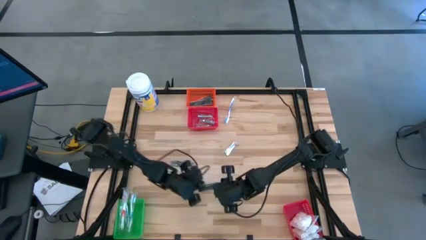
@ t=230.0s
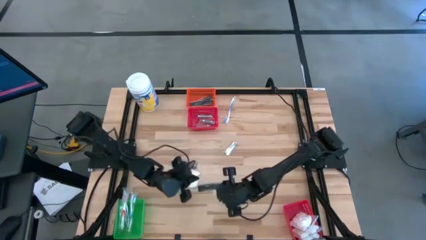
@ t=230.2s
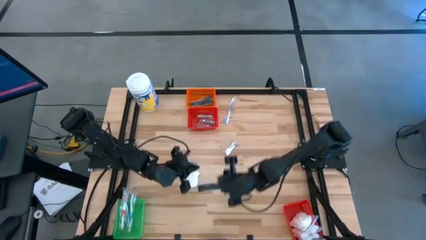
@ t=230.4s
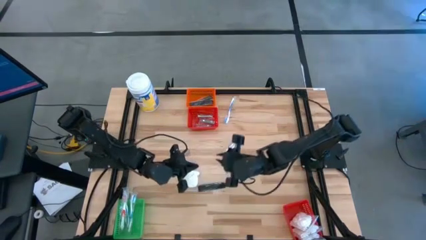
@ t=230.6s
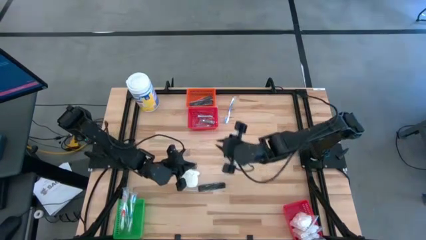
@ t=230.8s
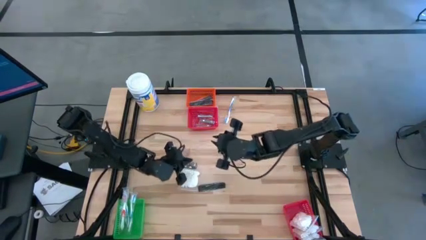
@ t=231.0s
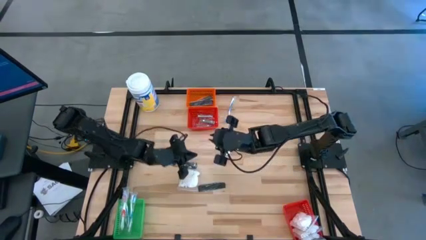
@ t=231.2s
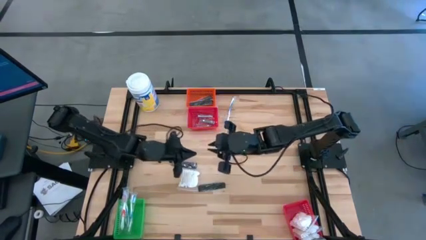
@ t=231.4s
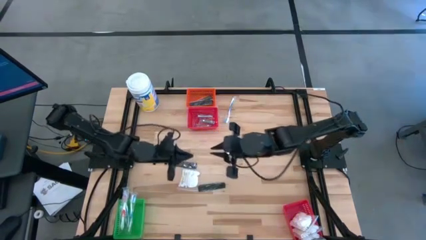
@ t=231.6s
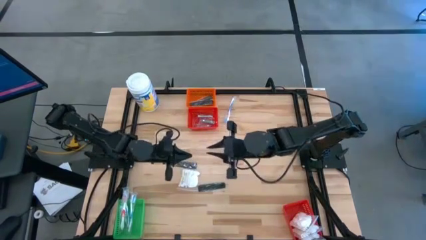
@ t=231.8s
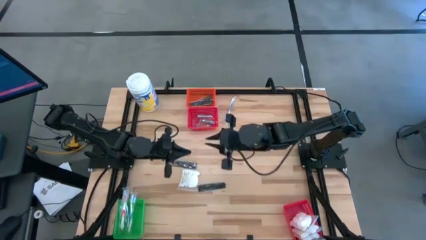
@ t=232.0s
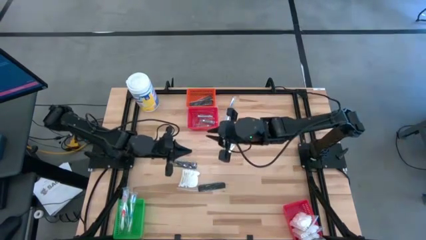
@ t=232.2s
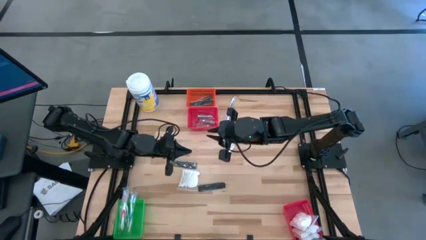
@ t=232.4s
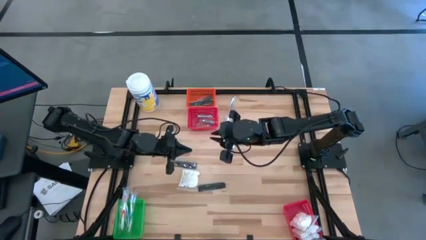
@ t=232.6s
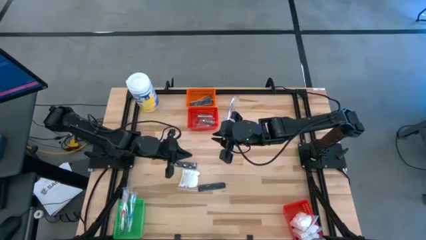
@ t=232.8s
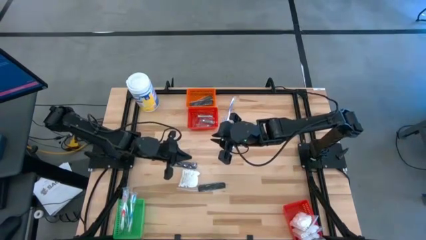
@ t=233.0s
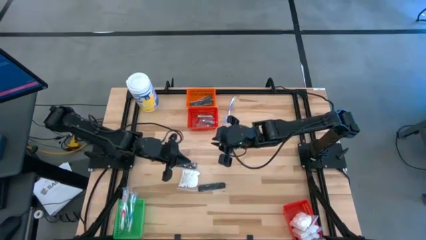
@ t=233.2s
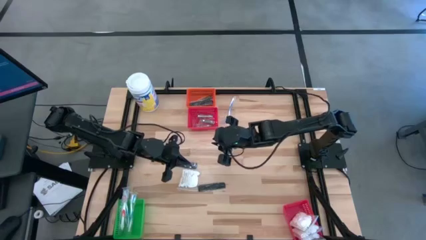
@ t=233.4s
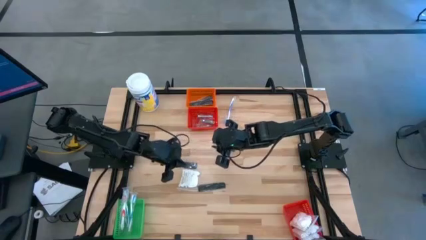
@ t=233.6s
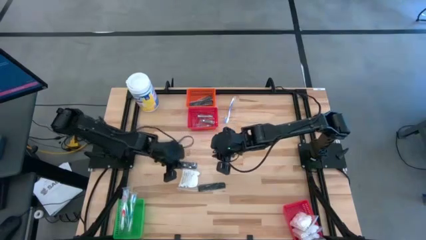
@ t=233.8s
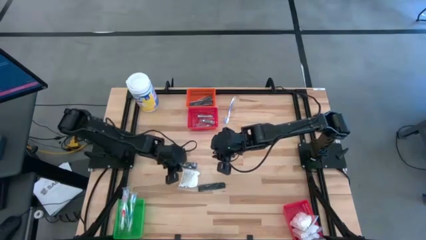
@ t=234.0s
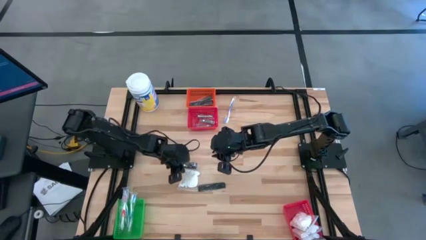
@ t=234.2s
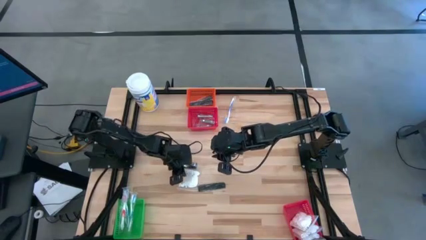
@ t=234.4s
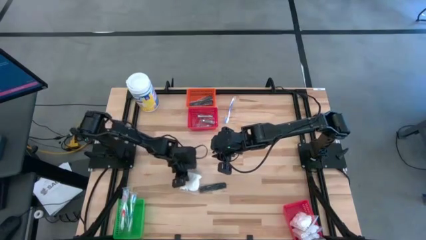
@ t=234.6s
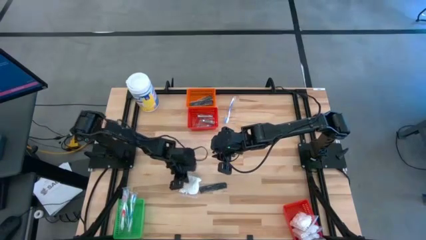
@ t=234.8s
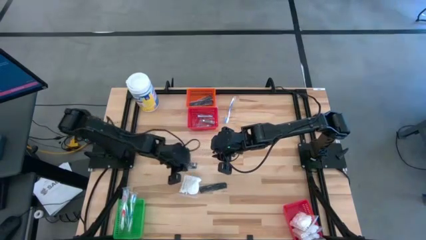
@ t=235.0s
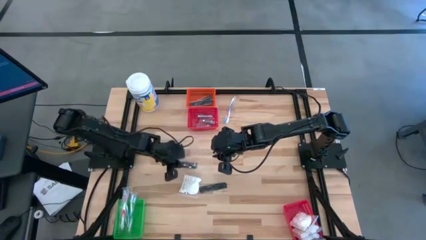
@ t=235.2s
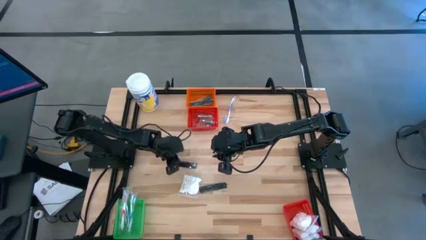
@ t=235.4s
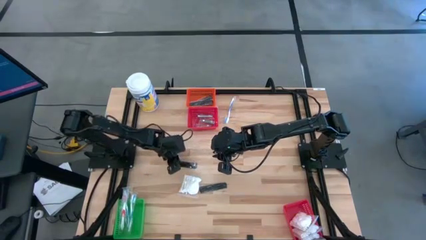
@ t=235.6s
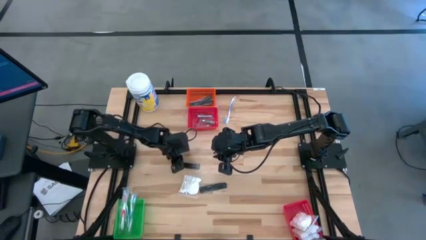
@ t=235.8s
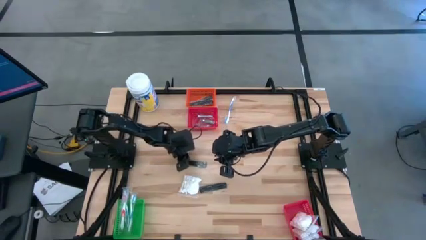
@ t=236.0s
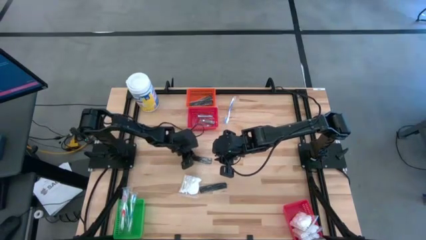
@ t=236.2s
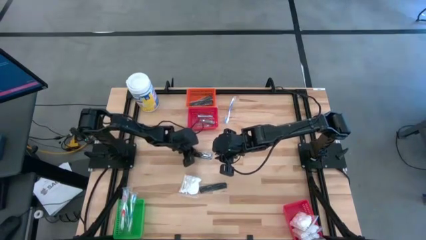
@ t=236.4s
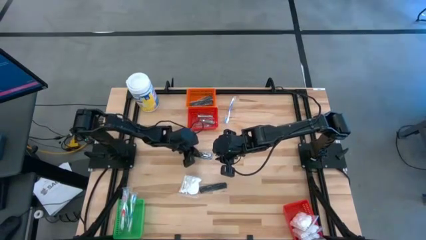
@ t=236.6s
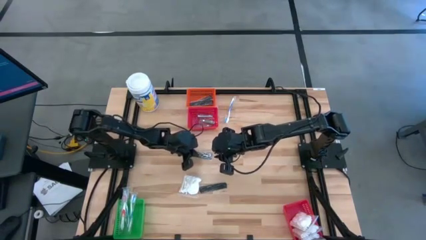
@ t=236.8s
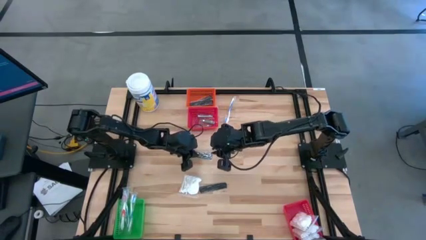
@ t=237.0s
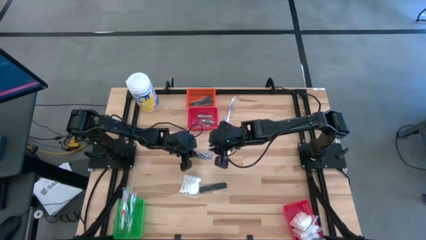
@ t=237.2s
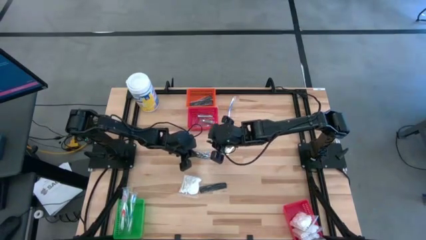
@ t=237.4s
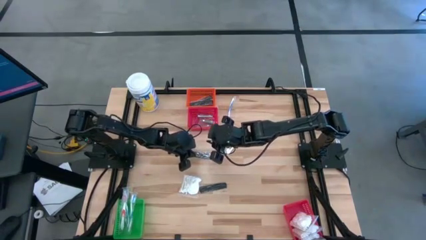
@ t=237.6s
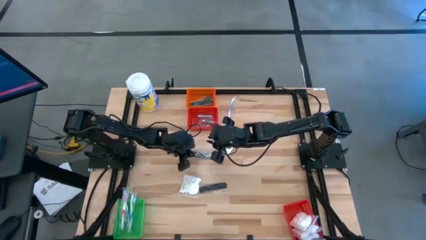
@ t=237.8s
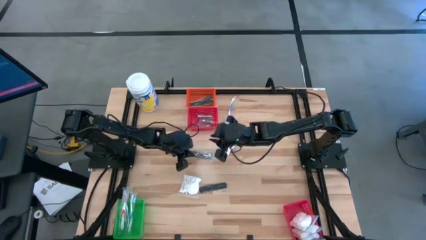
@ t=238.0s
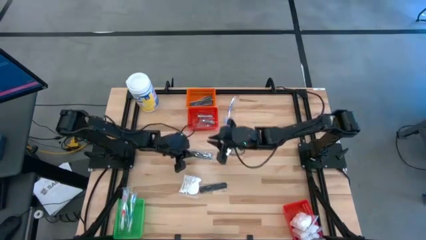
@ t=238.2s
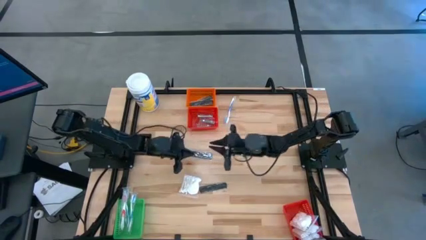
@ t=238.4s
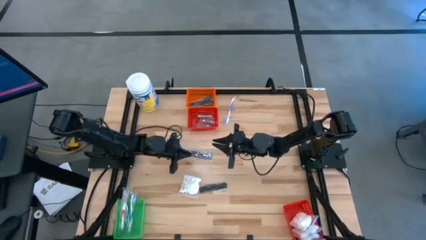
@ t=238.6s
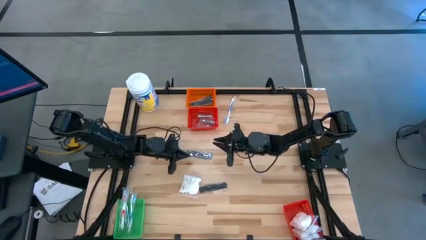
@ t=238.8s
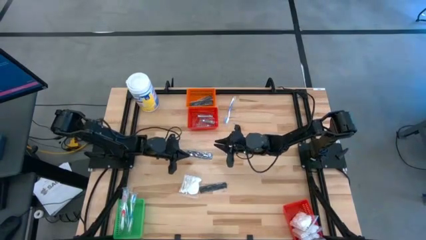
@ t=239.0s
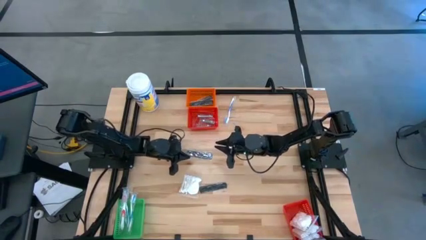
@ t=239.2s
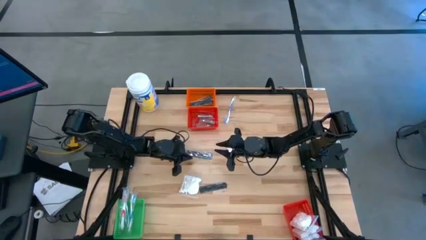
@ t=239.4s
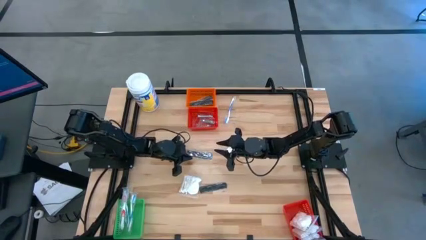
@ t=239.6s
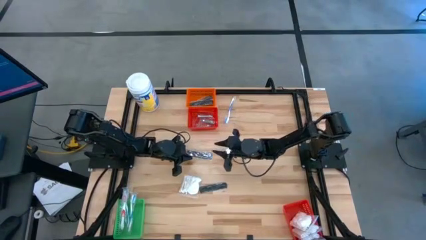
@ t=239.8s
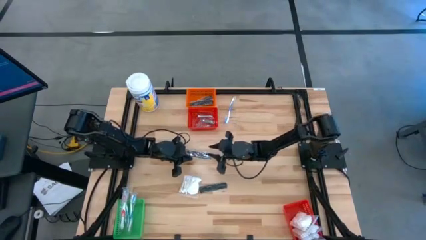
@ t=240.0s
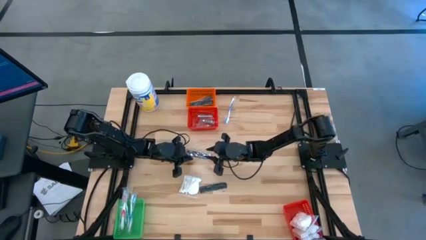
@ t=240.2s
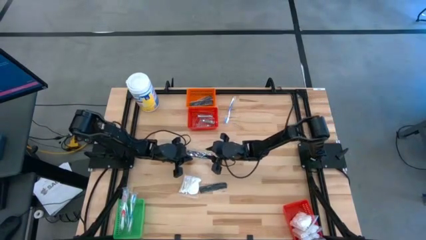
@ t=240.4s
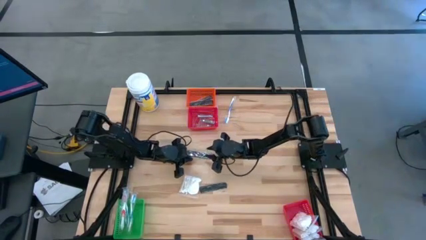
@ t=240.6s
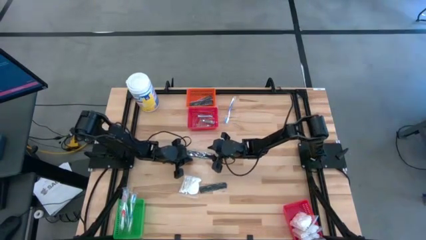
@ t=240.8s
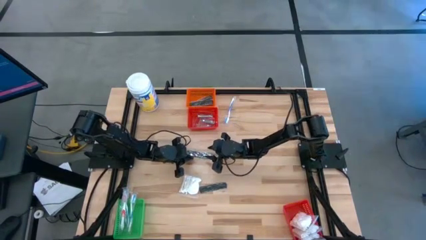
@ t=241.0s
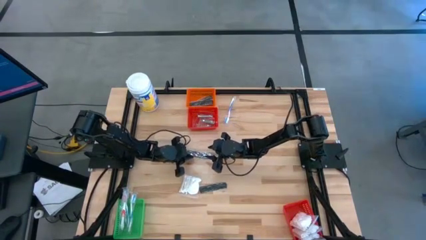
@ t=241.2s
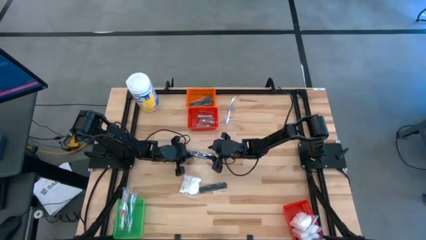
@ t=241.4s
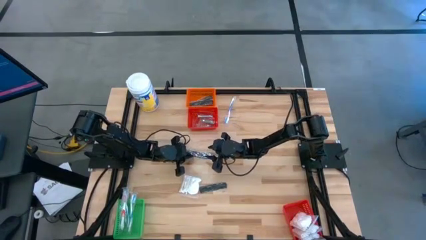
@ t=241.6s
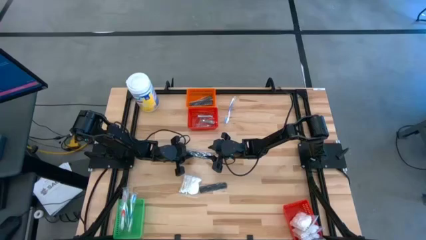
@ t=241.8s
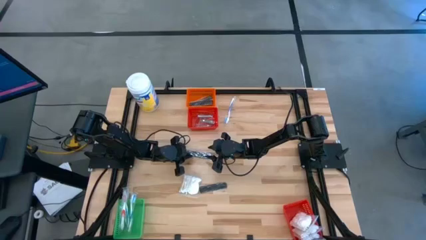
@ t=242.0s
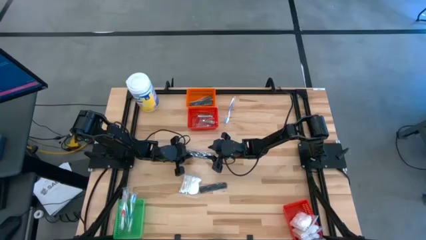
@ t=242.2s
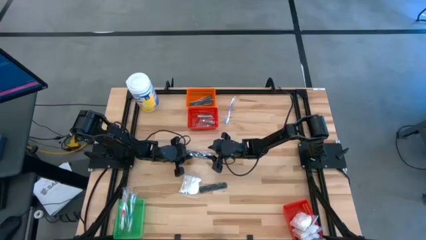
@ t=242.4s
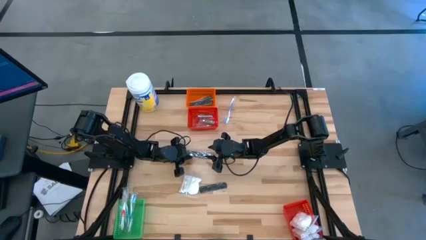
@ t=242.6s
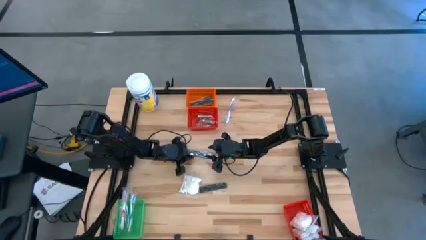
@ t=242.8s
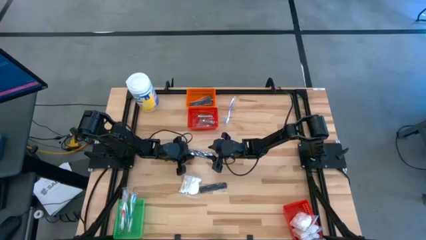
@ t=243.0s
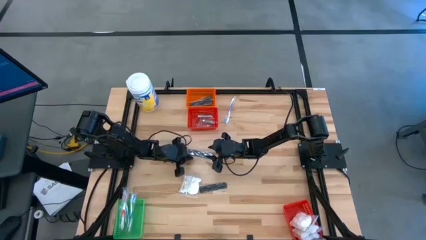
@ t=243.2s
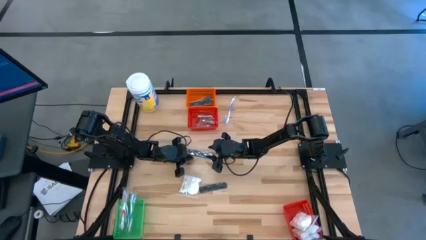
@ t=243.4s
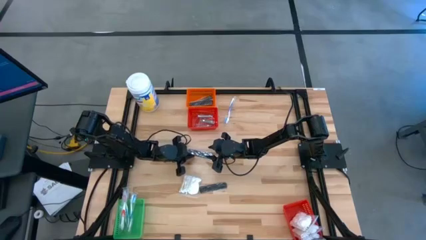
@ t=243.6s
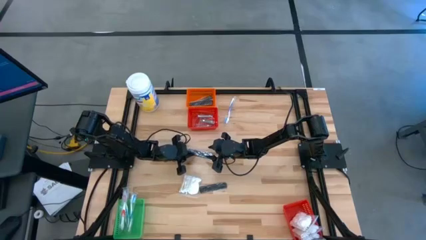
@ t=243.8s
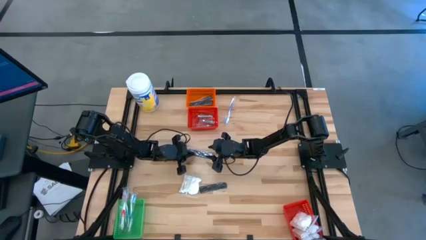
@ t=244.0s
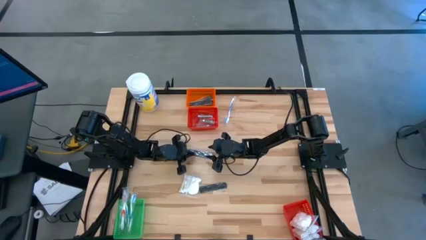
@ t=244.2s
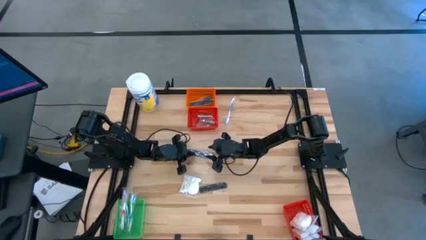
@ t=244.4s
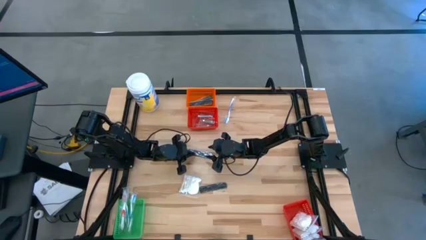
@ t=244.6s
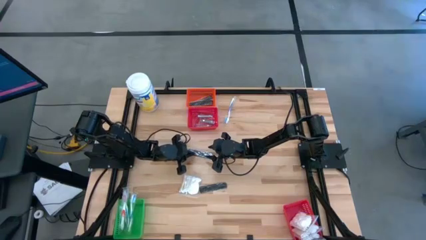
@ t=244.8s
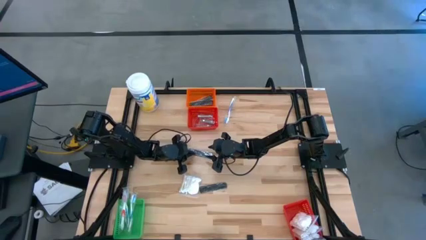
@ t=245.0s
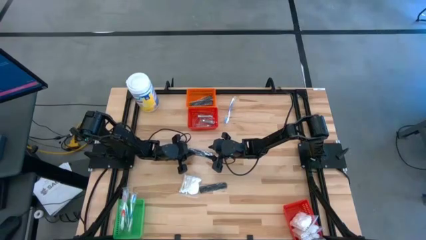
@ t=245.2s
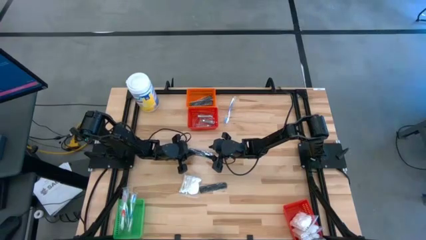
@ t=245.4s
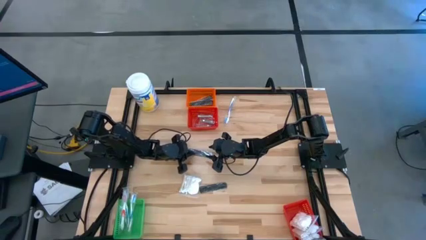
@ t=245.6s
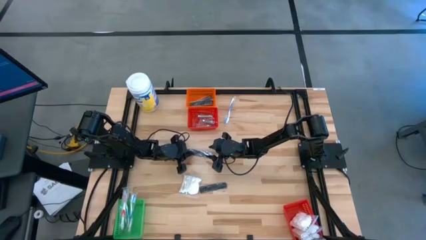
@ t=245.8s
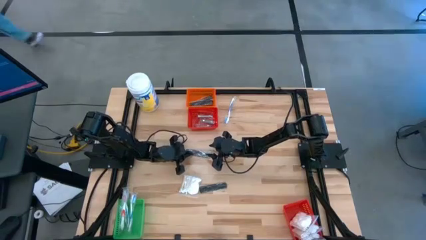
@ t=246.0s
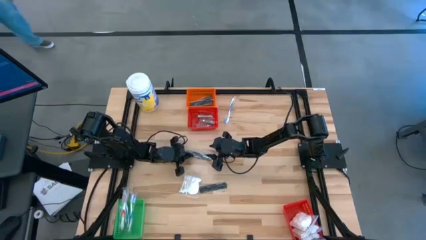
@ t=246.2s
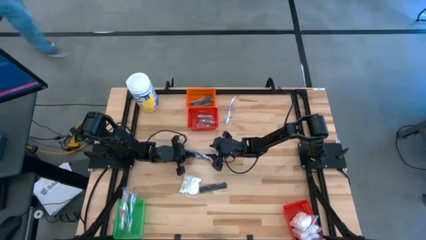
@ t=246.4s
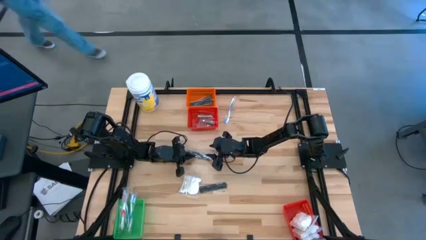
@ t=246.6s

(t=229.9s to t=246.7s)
Task: Pick & Place Travel size toiletries
Put the comb into the orange basket
